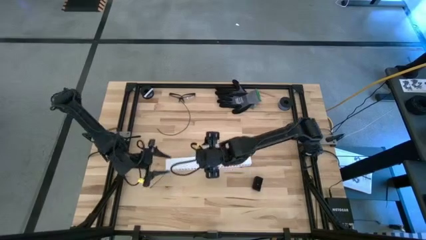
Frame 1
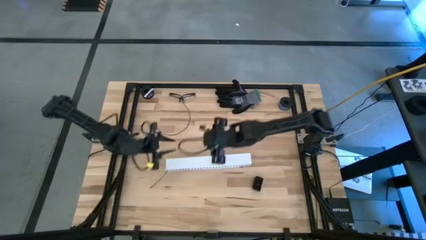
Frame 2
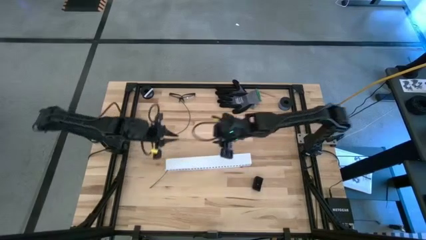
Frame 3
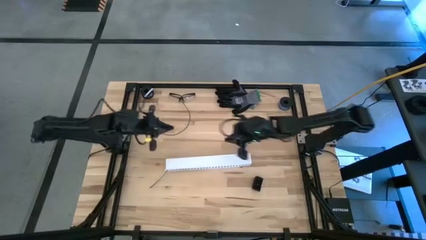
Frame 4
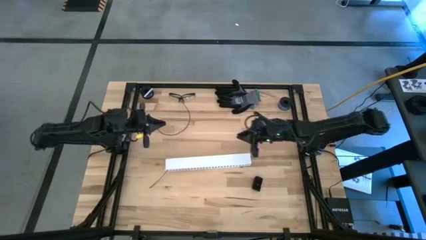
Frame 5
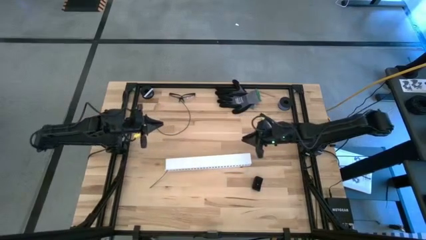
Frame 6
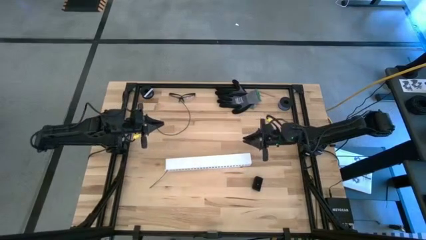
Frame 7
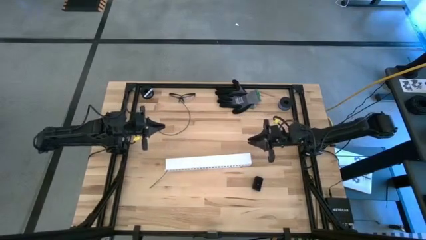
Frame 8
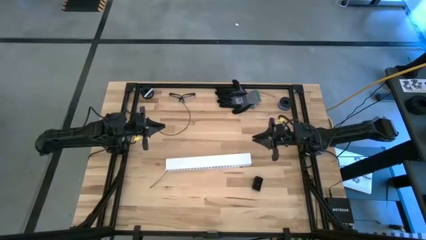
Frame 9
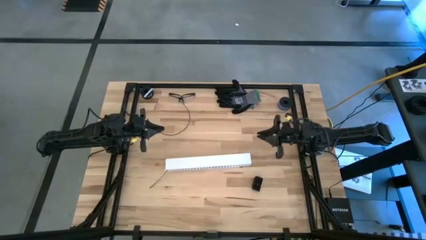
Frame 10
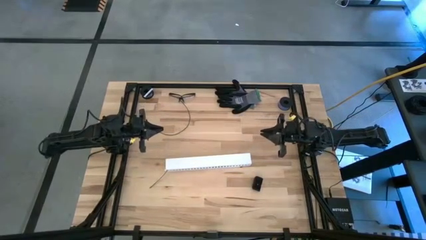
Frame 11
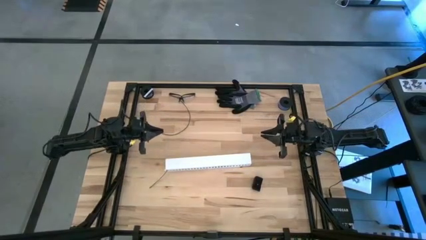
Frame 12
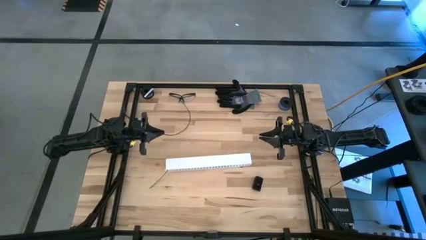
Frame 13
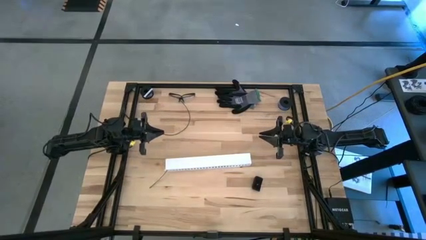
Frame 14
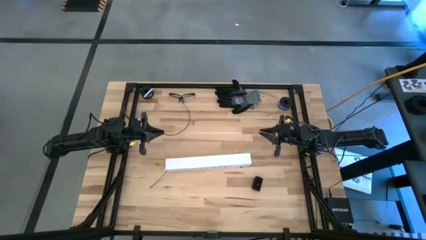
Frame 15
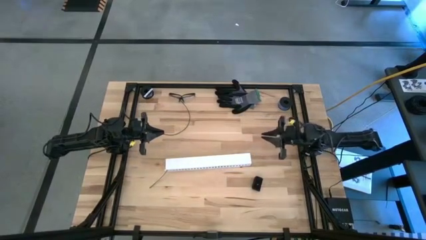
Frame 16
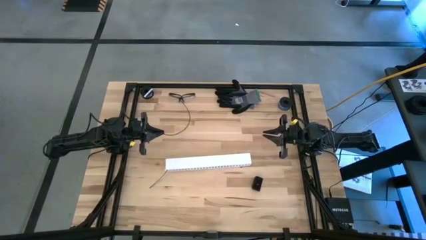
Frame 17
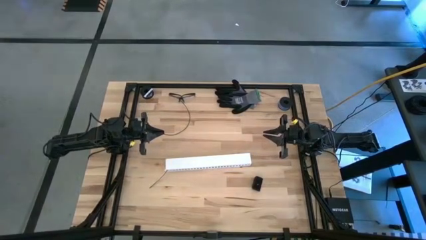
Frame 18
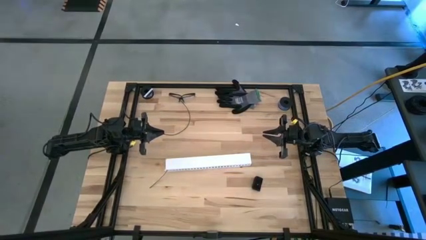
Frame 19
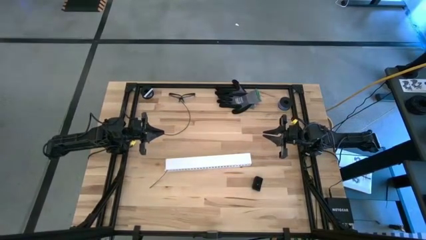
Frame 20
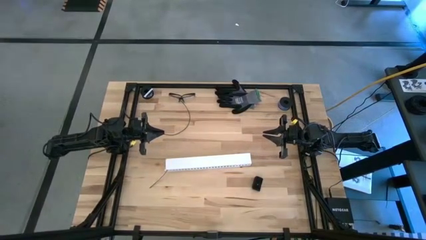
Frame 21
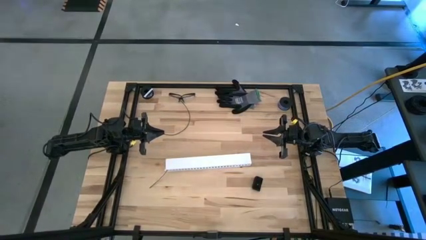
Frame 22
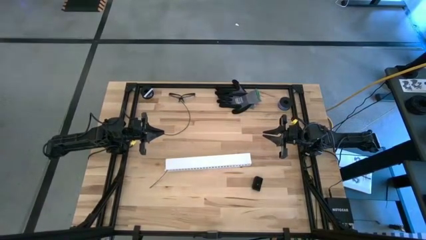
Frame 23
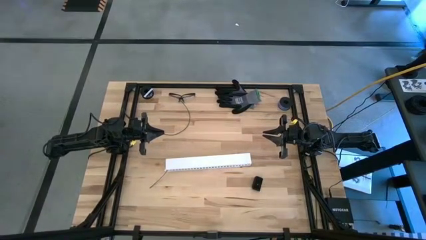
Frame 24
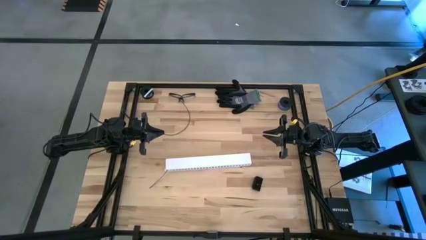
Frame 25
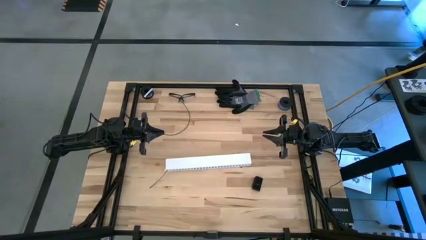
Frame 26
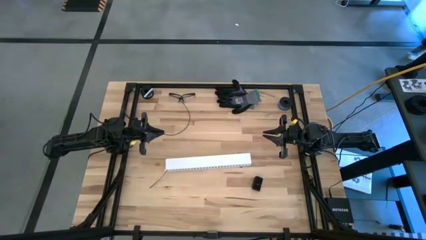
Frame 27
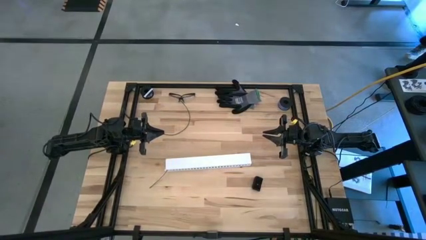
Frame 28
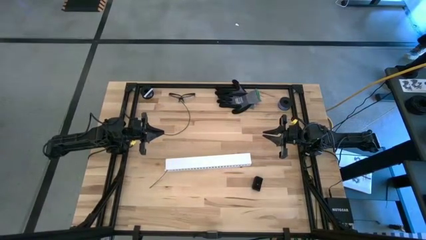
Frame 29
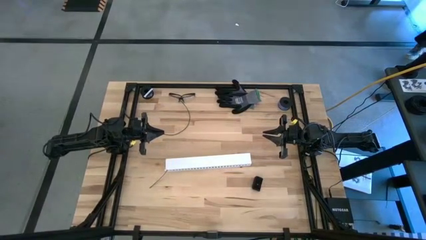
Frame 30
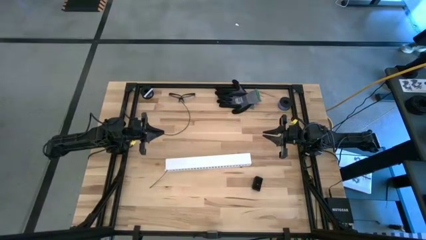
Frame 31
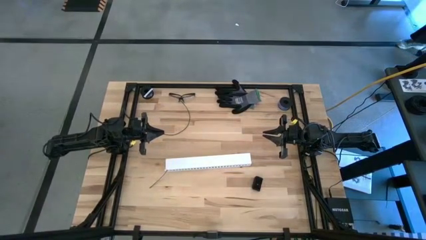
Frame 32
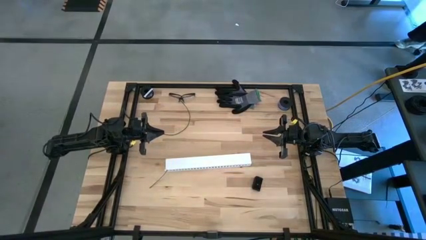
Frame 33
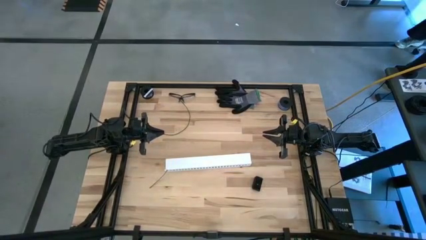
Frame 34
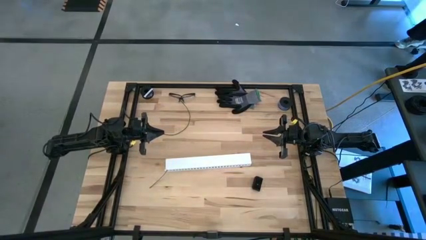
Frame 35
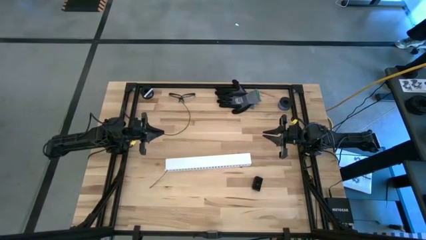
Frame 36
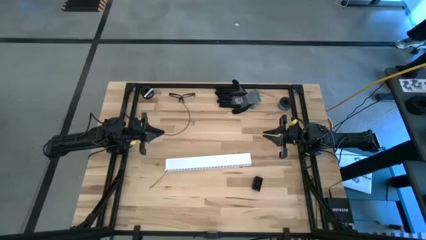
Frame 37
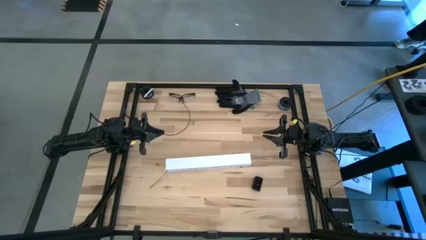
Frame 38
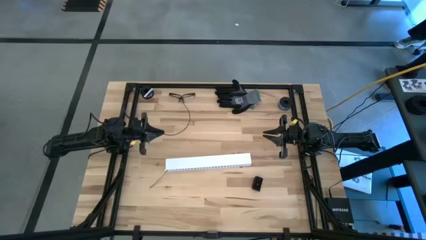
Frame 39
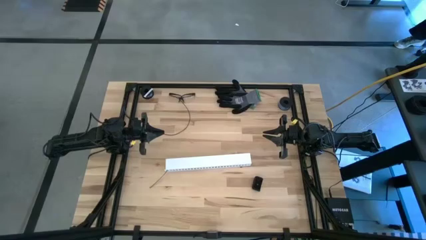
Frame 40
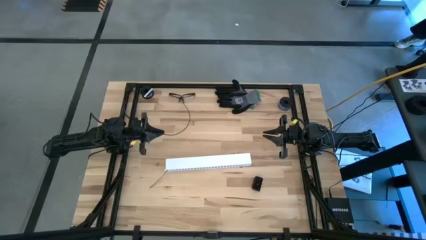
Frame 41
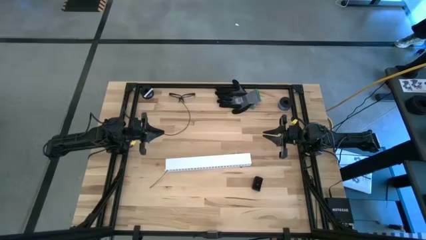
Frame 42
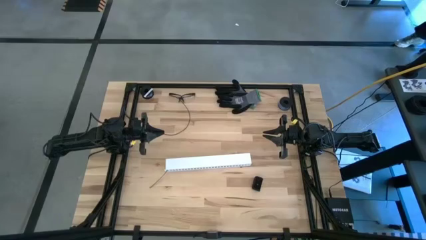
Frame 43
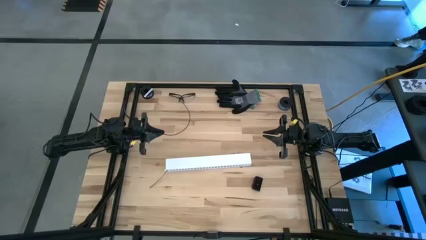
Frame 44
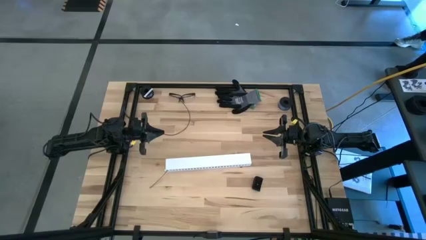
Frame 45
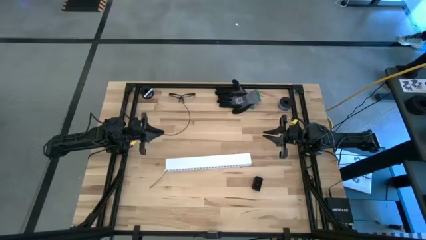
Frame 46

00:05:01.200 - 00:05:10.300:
Task: Ziptie cables
Return to Home Position

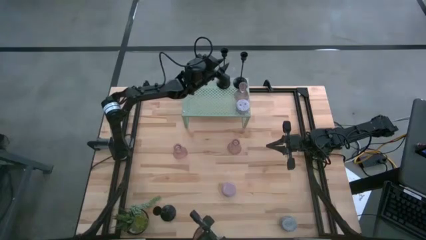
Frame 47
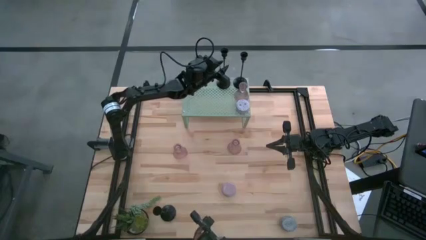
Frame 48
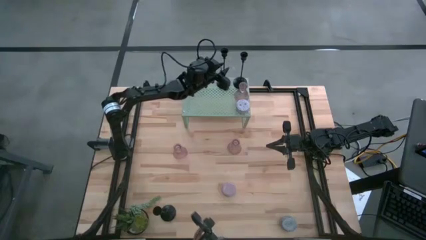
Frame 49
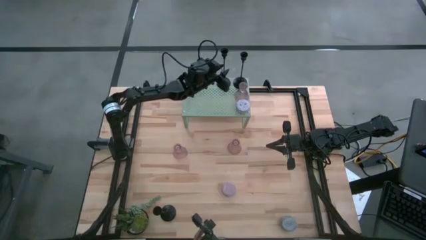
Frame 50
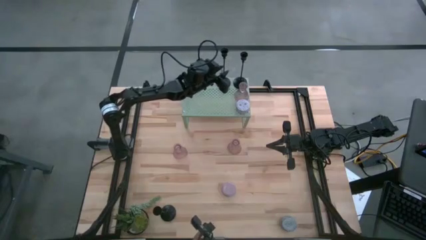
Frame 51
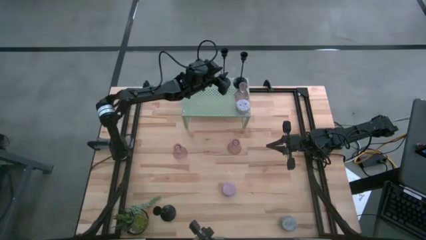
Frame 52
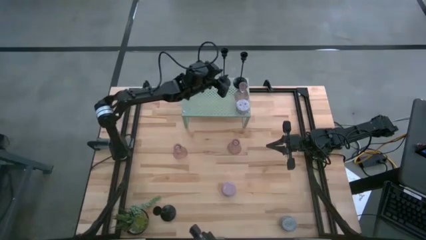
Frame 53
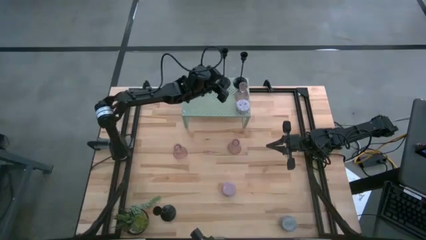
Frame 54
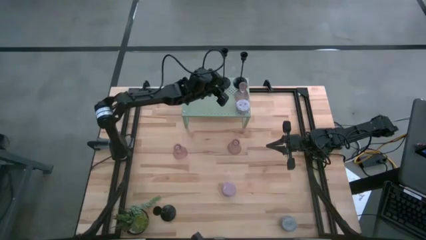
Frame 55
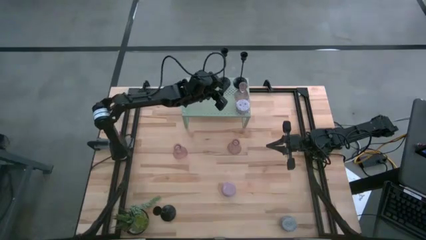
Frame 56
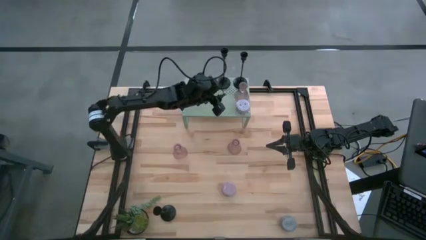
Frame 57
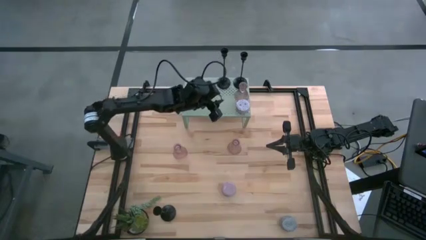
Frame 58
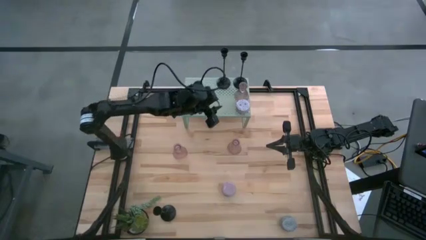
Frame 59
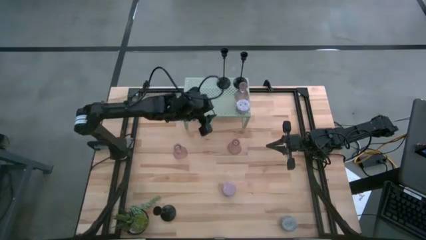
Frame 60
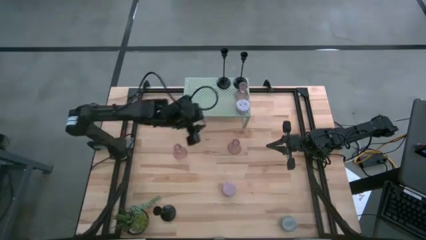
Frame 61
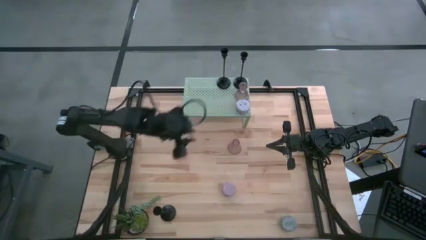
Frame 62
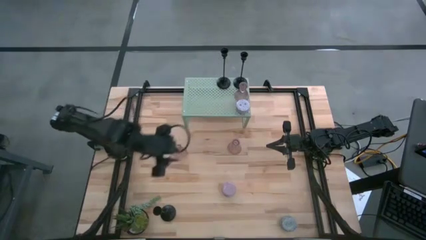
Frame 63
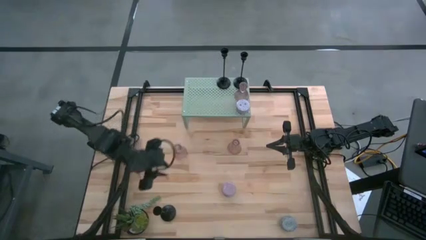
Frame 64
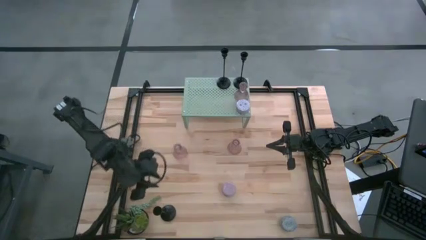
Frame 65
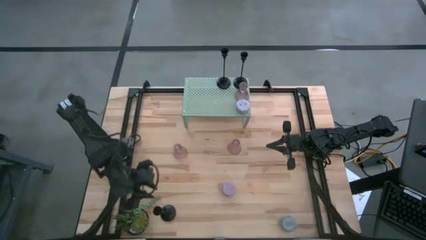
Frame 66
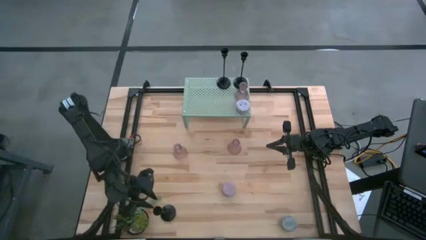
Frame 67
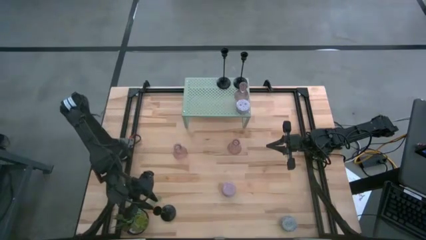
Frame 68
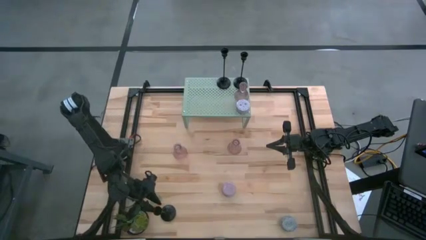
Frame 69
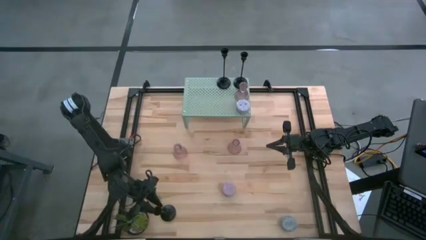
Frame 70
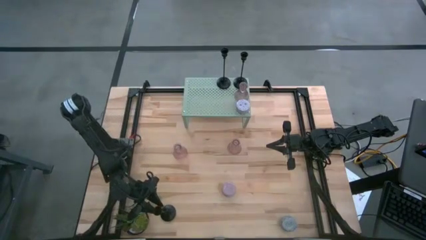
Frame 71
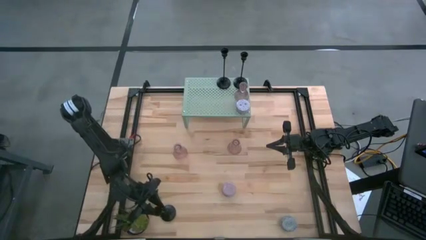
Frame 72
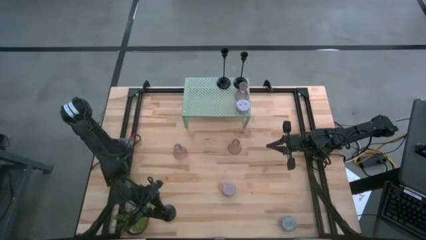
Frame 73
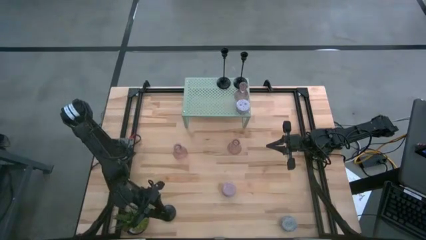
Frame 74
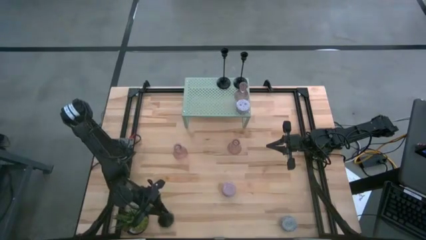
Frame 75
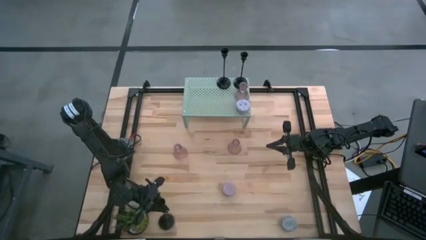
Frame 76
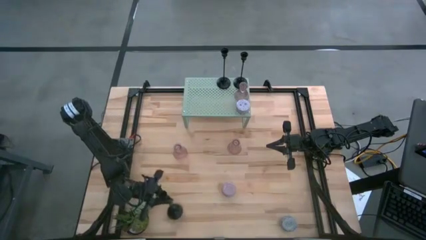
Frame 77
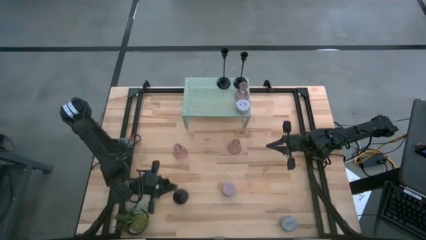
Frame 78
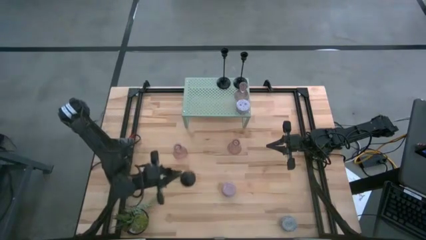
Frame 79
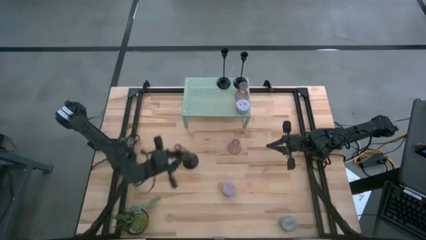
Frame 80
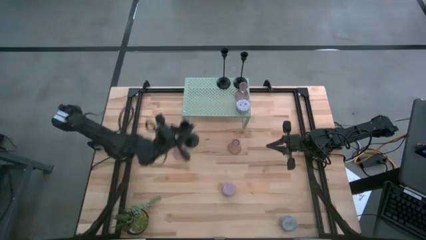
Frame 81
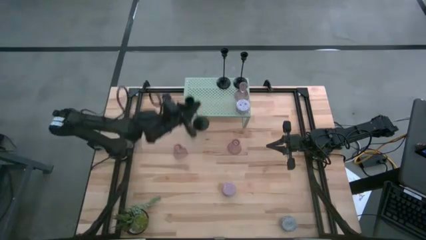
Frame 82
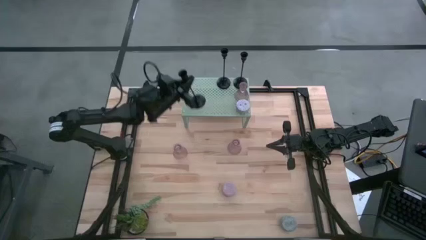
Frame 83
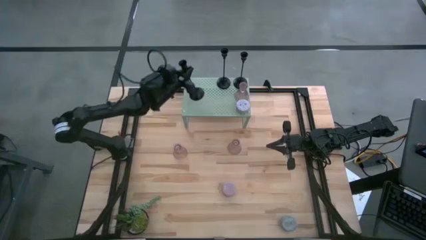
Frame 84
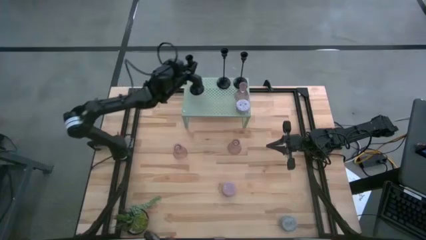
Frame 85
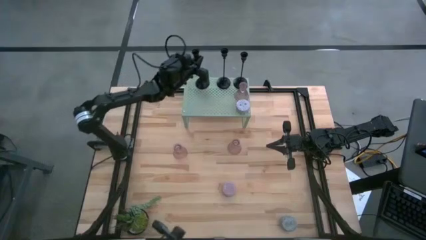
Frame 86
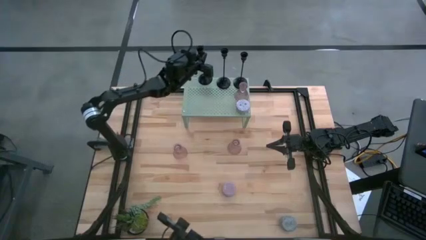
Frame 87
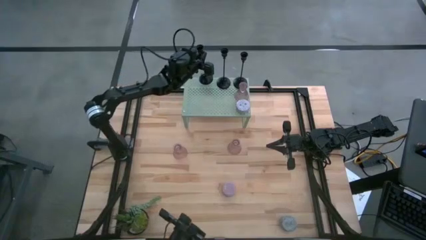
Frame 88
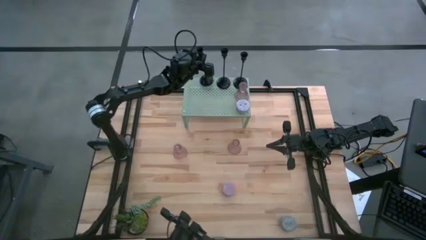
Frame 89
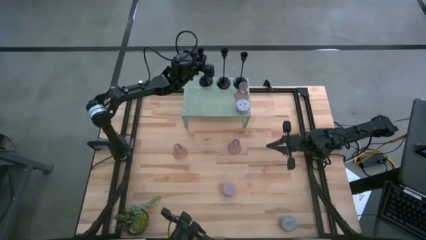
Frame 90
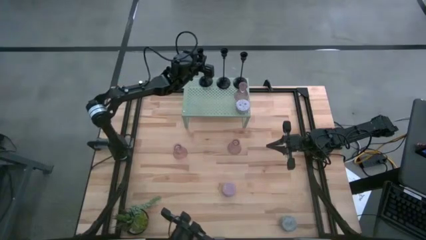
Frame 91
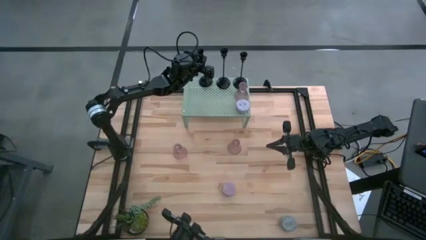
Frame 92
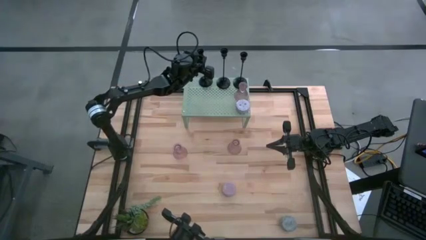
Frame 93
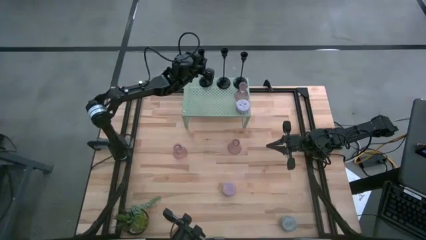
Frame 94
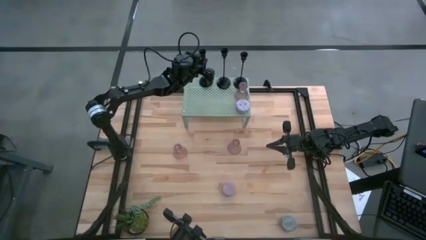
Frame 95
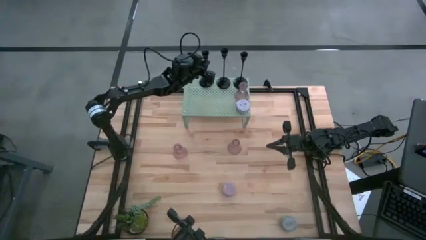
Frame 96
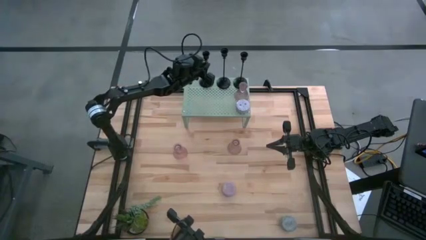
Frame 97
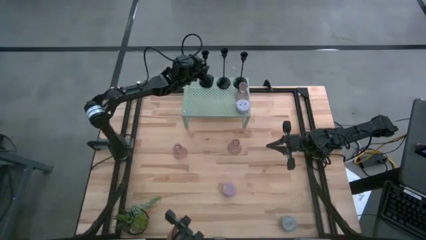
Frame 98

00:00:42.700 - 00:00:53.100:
Task: Pick & Place candle stick holders
Put the black candle holder on the shelf
